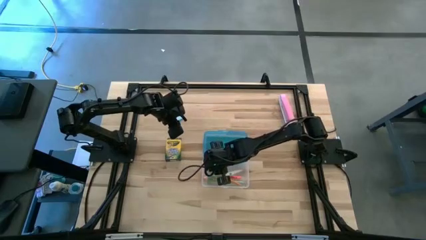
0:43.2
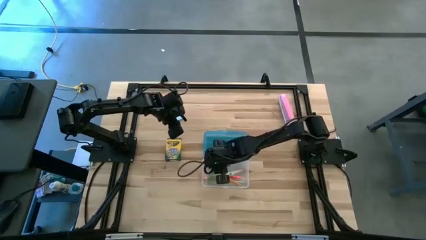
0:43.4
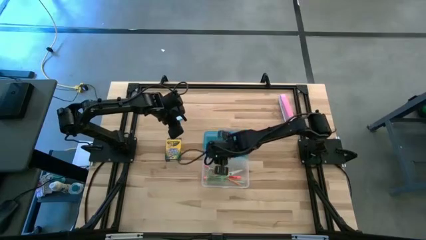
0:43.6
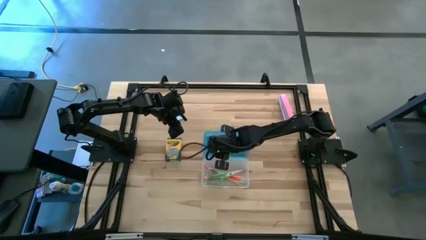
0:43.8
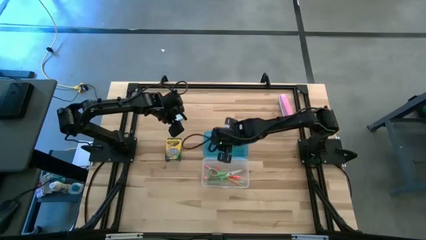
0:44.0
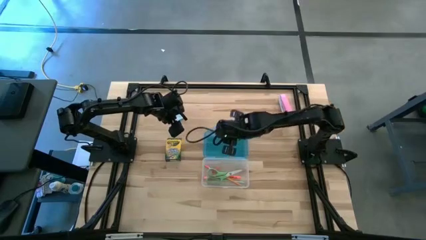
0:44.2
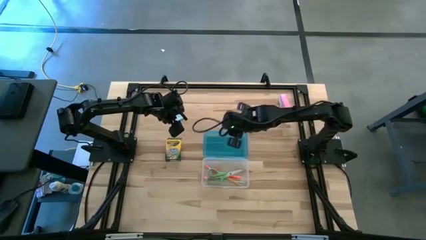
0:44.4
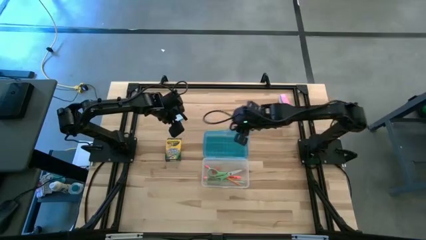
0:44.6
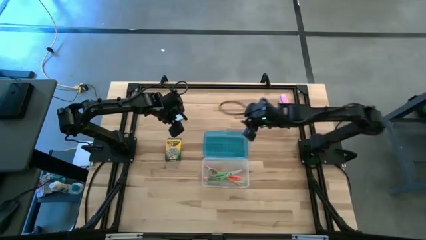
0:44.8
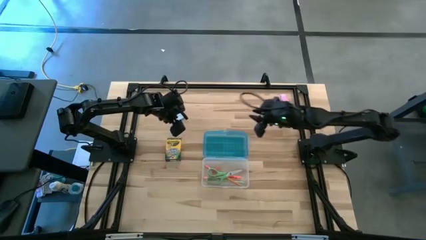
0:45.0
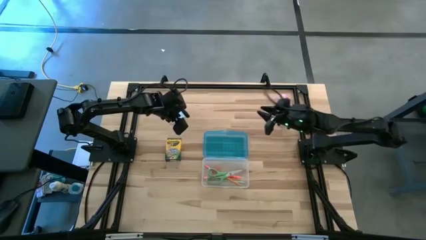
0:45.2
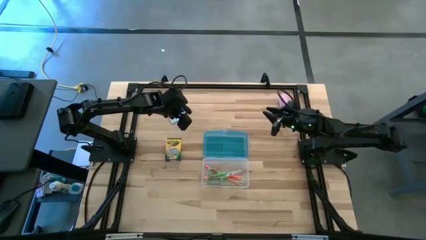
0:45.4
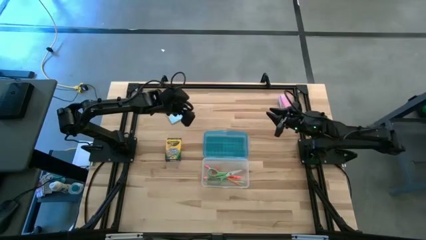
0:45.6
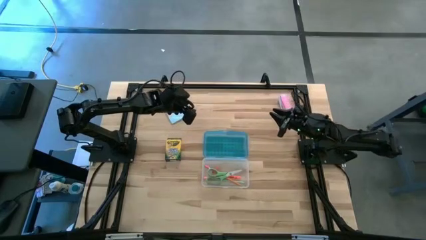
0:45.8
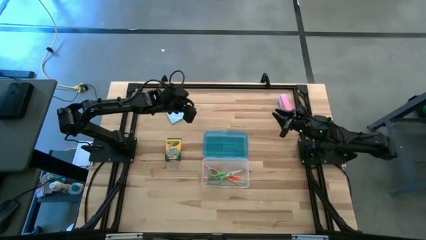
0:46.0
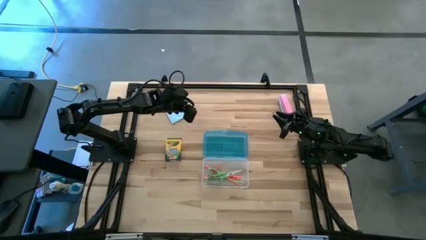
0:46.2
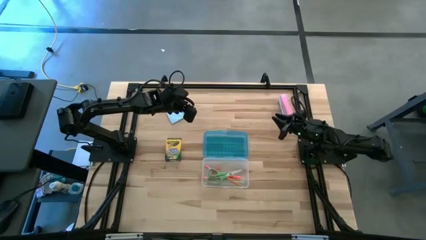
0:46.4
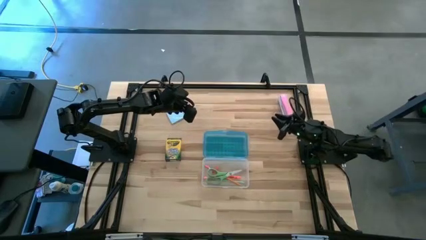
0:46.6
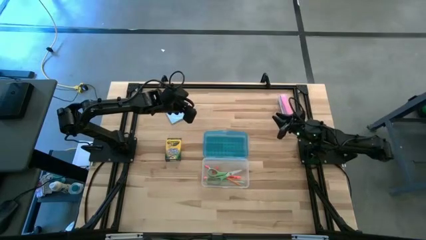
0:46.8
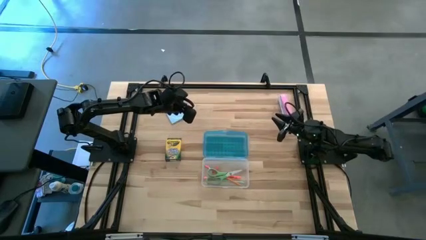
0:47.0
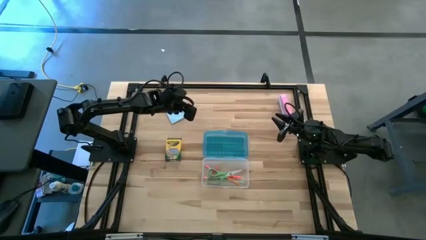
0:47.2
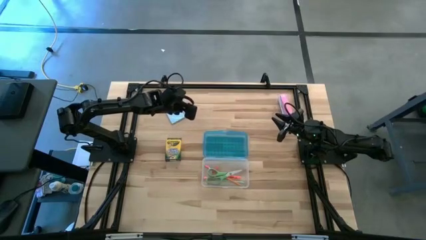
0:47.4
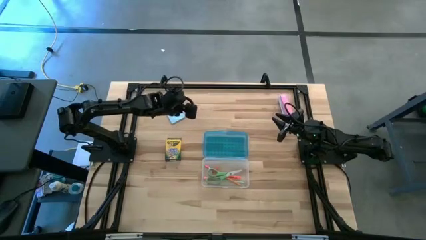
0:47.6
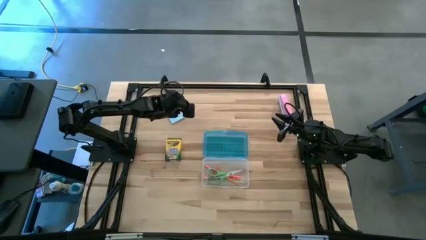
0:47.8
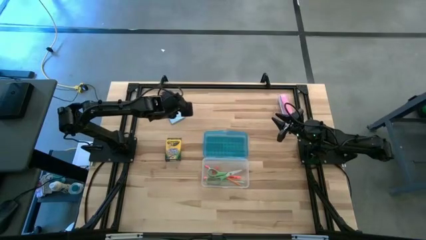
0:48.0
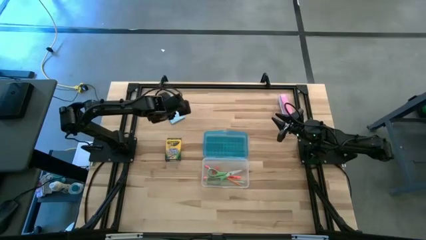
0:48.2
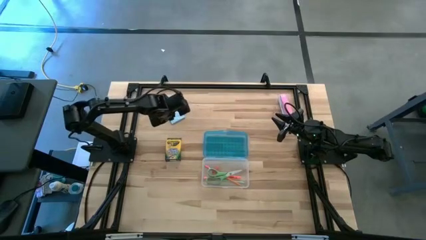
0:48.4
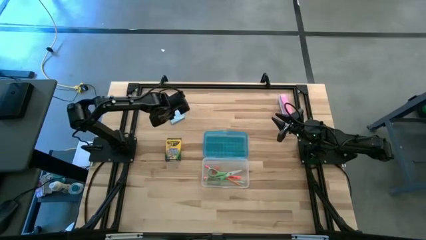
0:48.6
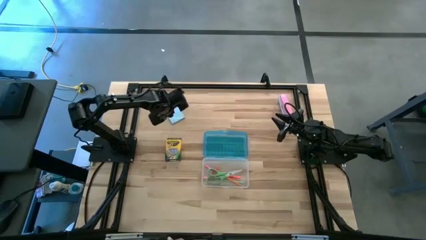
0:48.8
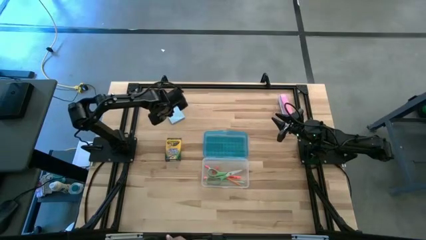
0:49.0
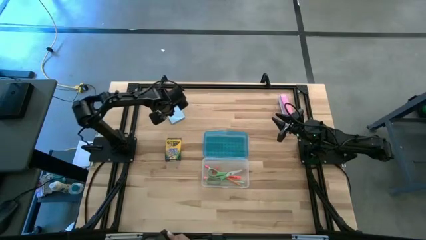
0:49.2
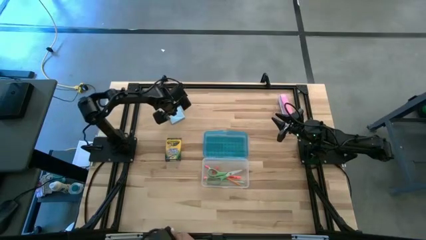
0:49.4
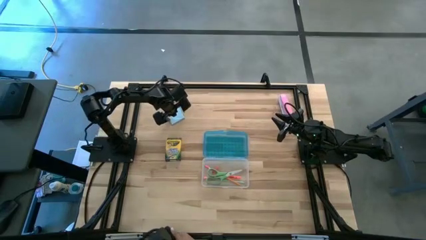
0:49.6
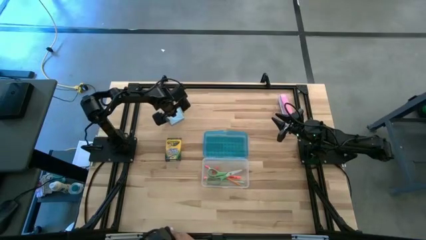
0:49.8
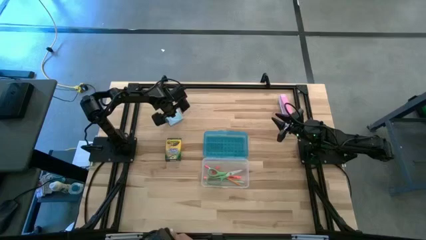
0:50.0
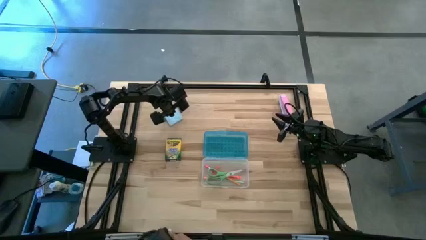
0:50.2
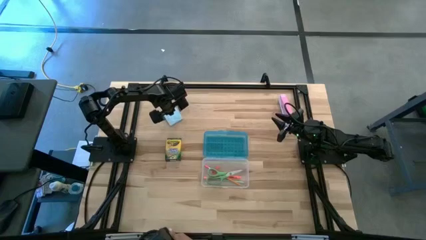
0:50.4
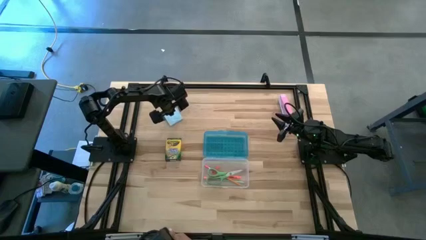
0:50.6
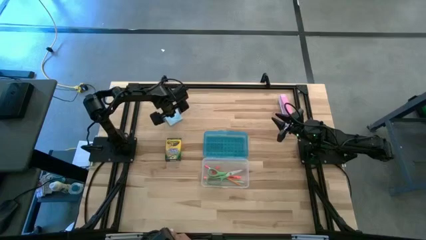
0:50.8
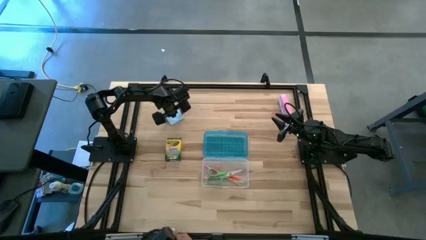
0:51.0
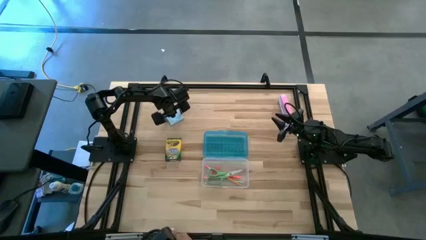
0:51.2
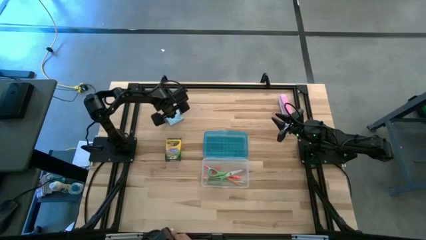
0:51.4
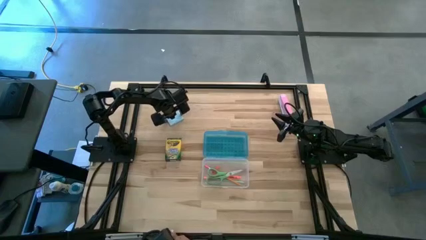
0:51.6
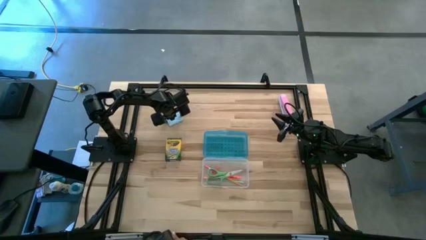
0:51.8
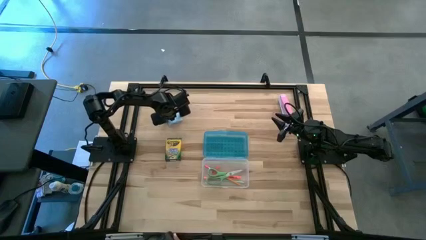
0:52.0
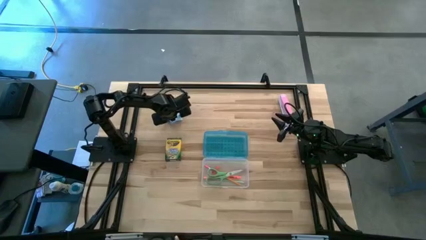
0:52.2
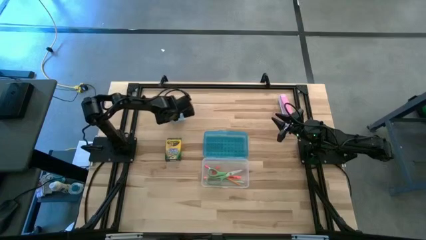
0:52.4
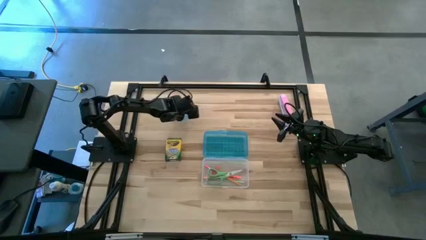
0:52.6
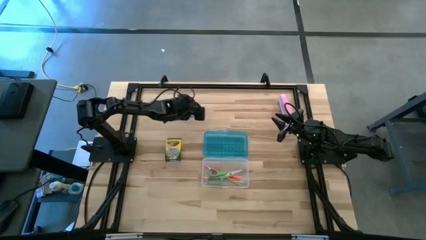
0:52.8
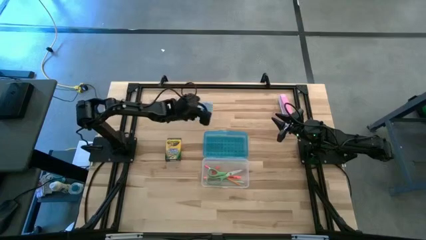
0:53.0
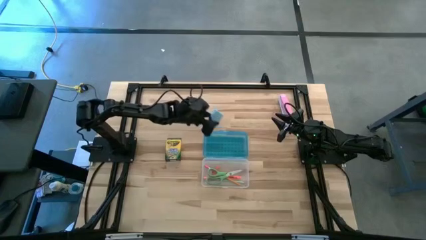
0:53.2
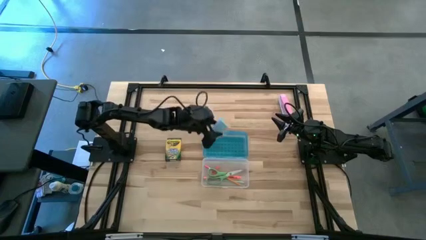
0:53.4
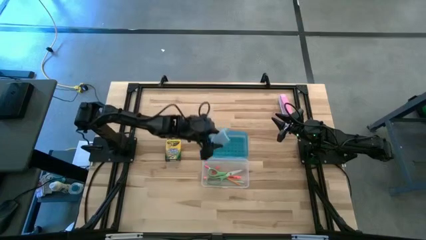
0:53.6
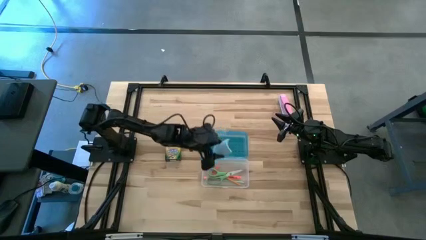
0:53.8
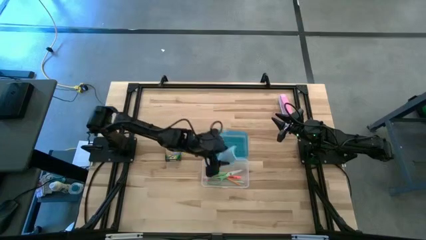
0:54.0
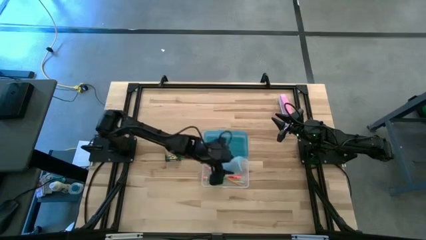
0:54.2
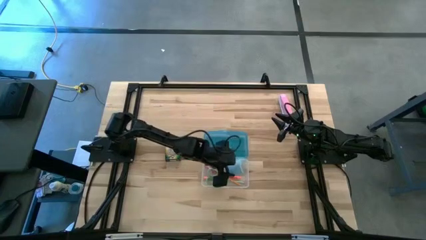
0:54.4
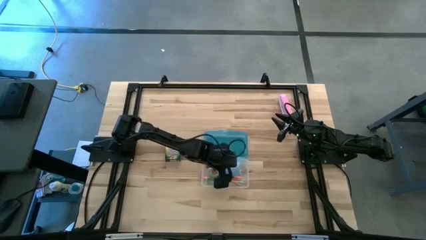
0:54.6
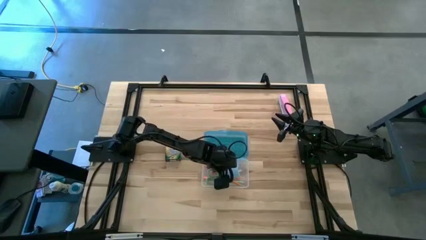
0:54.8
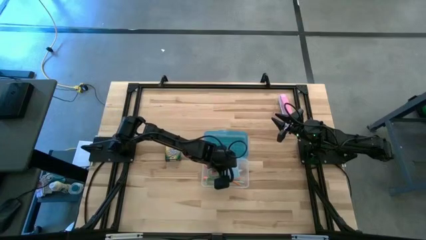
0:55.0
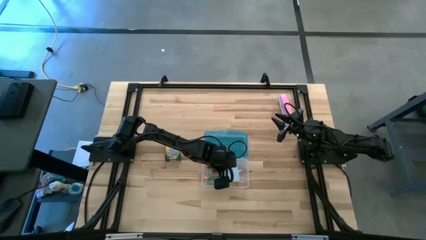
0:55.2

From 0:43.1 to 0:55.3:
Task: Pack school essentials
Put the blue sticky note into the blue supply box

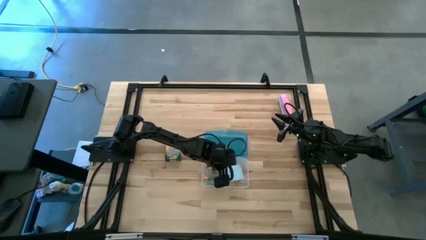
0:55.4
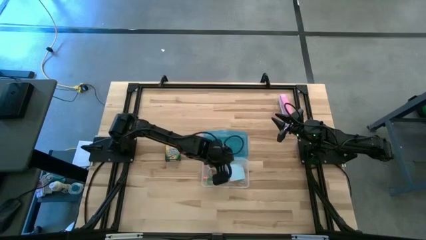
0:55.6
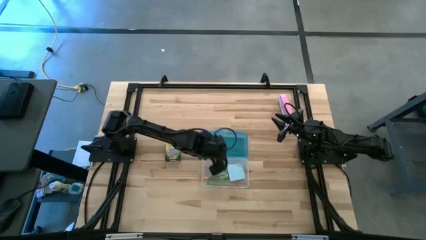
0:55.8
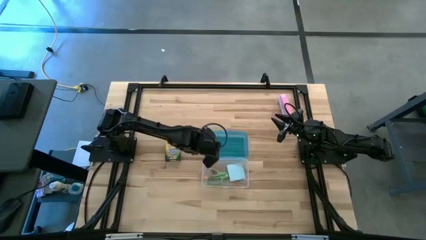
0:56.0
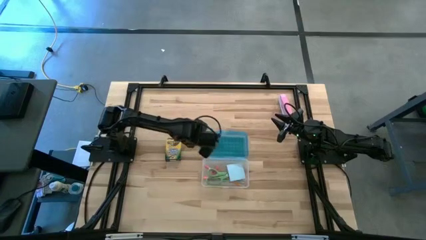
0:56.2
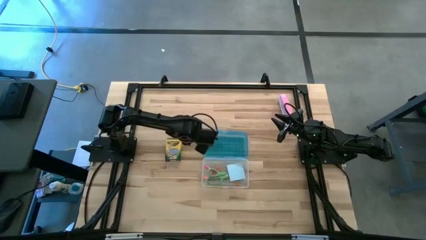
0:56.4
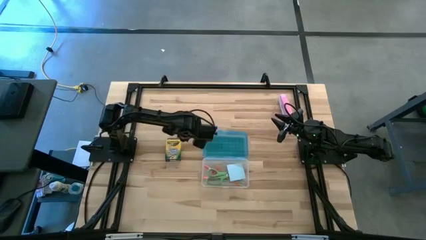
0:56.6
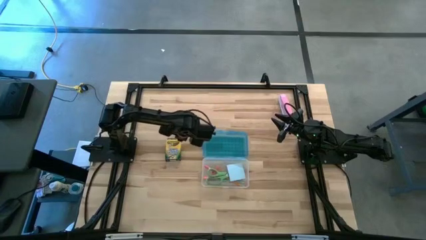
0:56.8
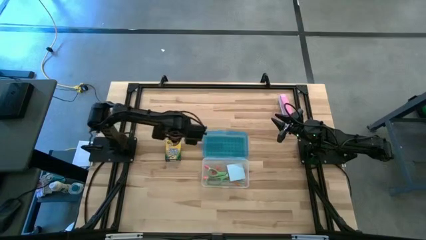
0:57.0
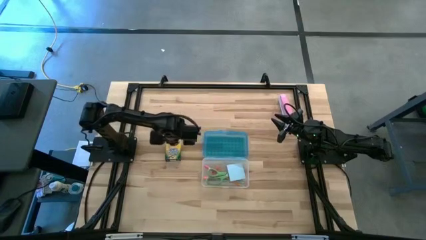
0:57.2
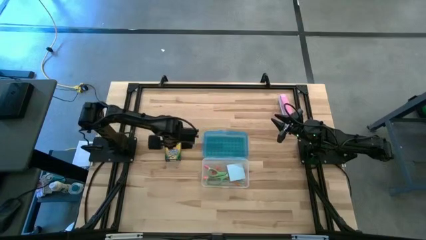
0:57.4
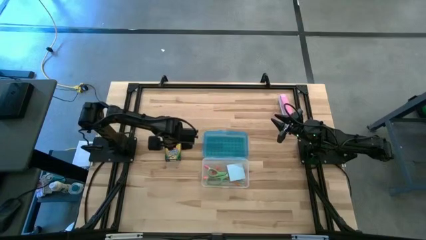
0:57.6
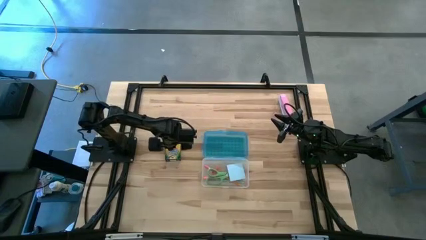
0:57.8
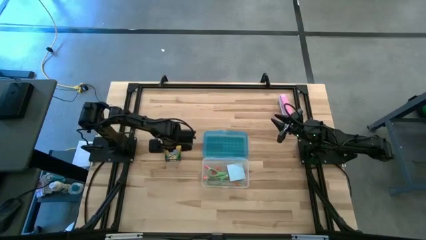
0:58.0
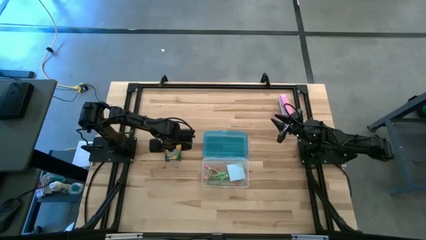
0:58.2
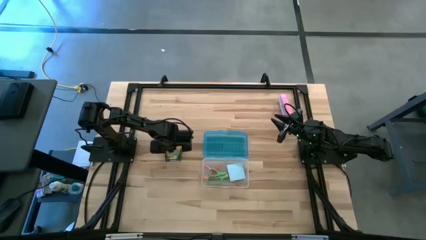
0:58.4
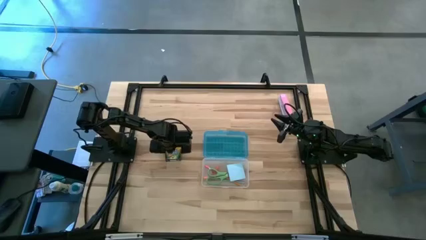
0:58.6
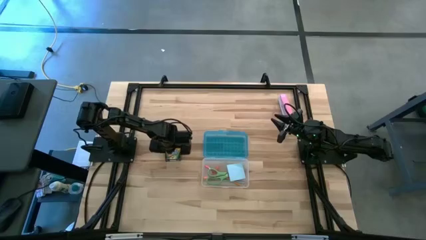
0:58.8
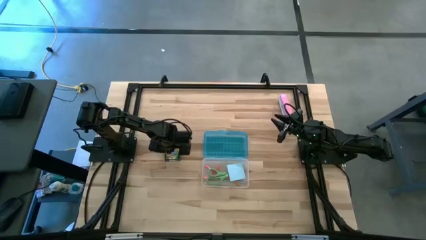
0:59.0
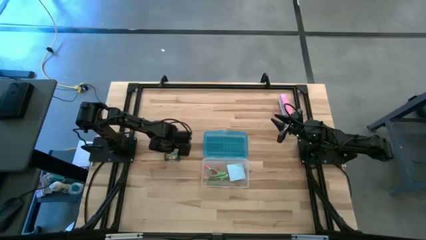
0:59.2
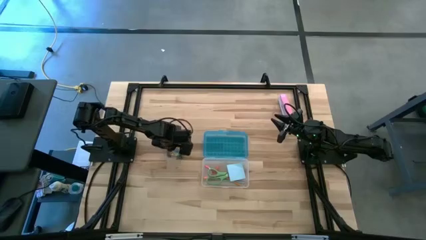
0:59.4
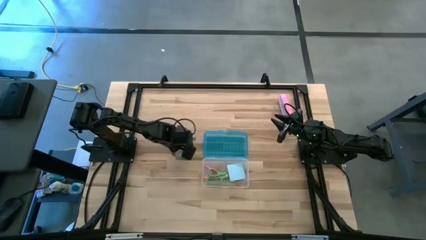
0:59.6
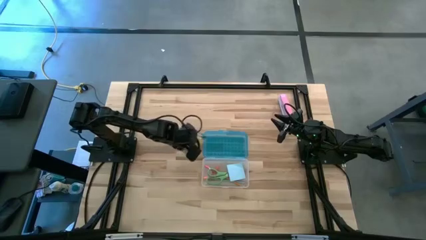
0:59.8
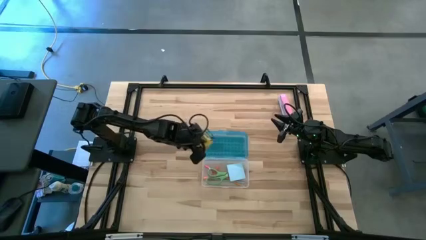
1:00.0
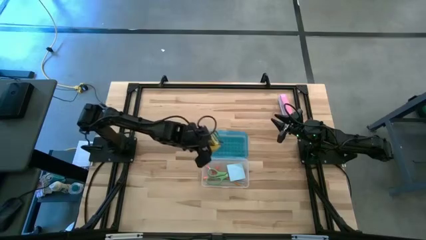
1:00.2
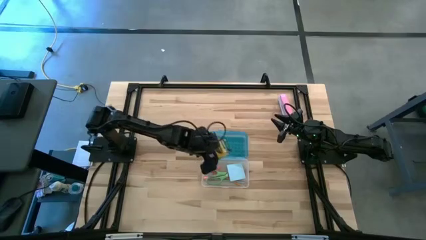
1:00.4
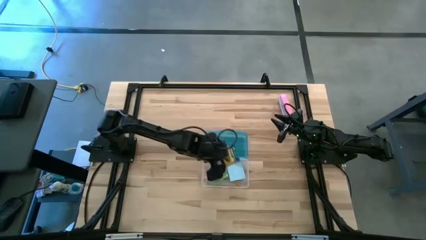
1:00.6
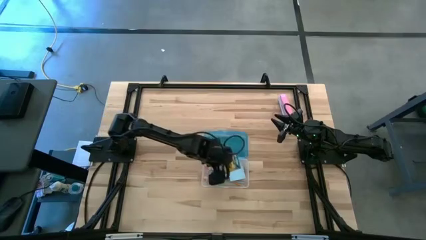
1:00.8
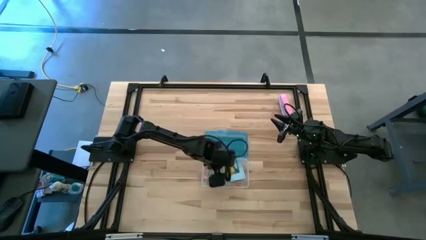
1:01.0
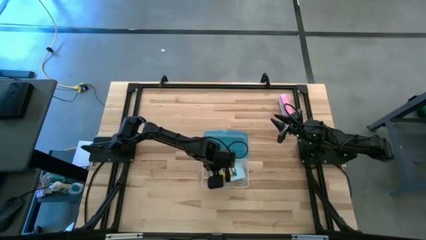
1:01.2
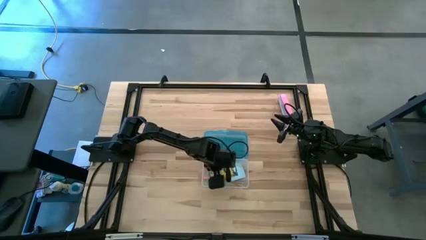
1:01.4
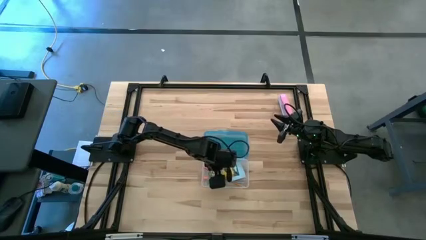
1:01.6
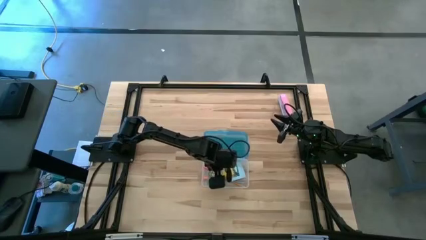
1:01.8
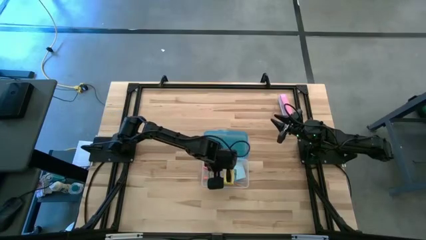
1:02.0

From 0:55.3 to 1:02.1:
Put the yellow crayon box into the blue supply box
